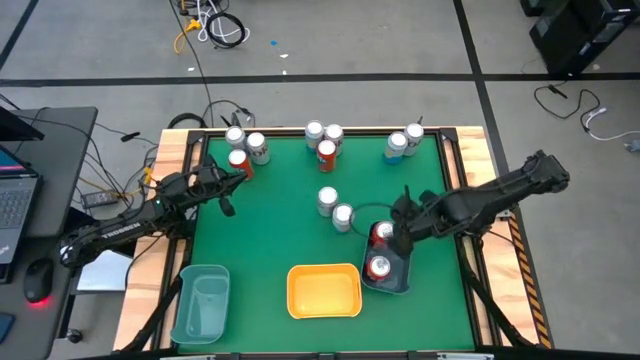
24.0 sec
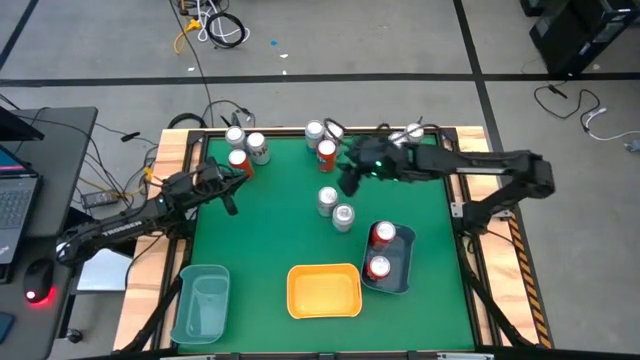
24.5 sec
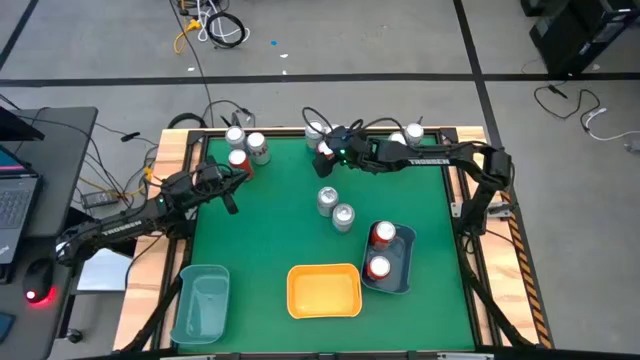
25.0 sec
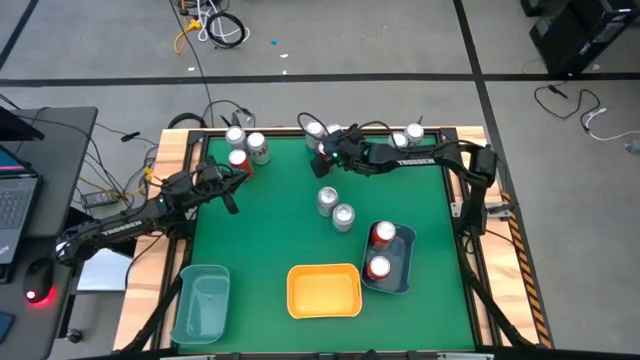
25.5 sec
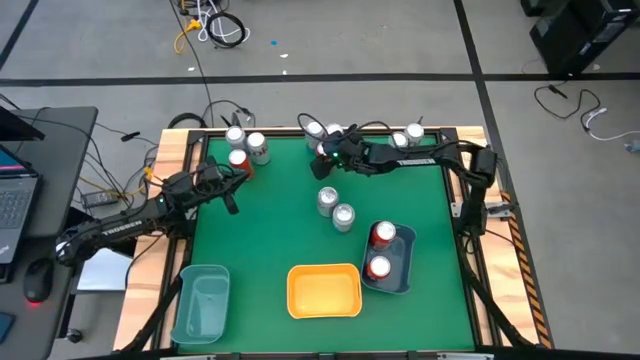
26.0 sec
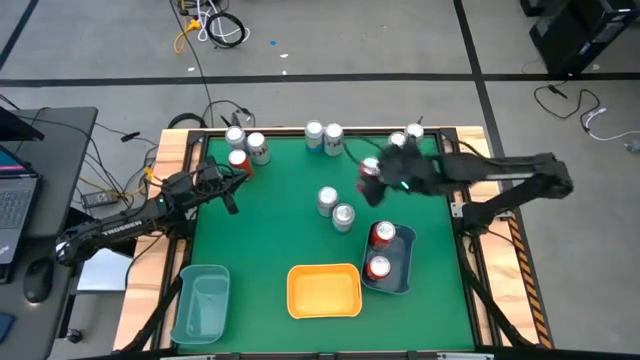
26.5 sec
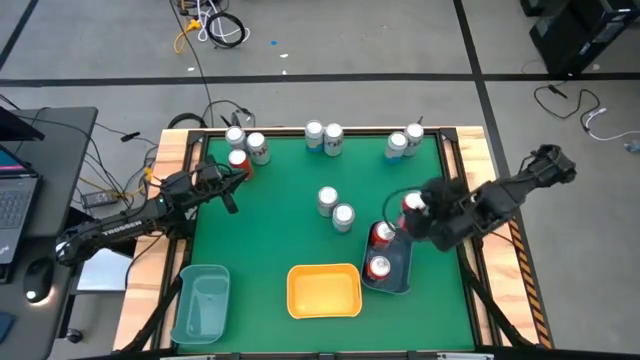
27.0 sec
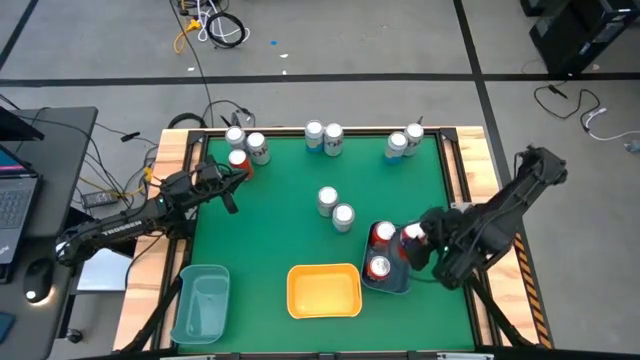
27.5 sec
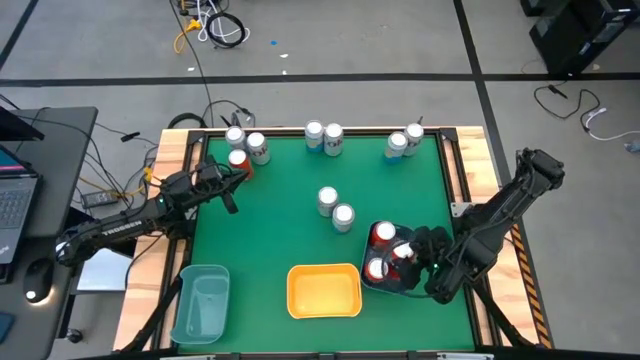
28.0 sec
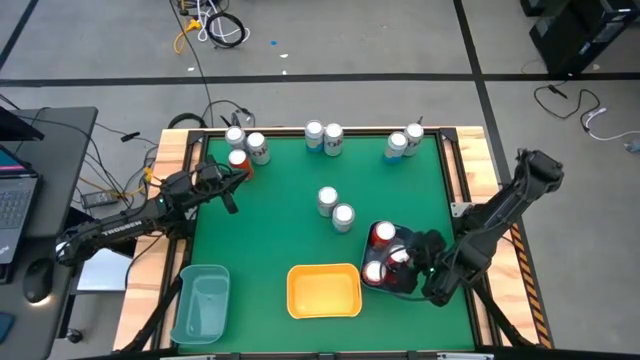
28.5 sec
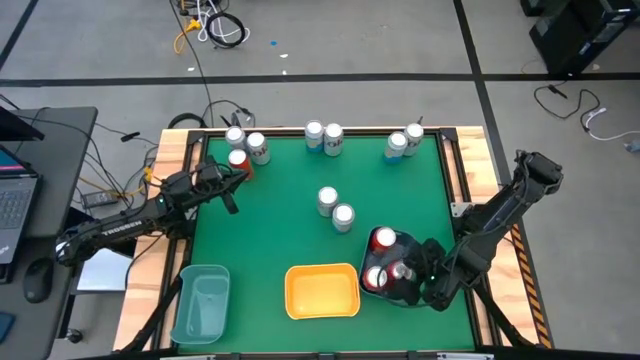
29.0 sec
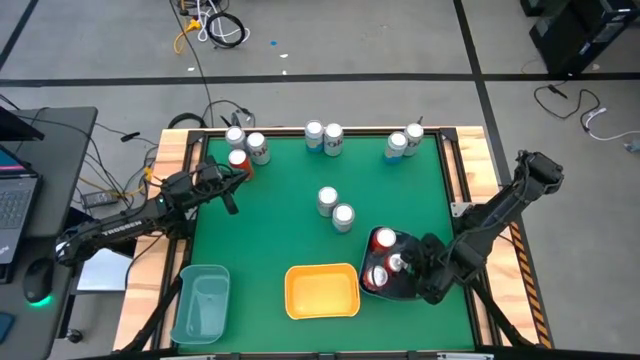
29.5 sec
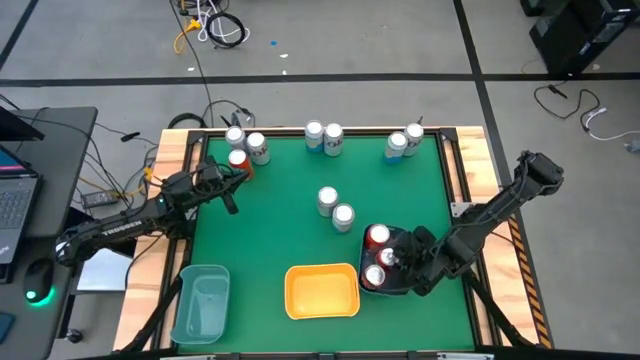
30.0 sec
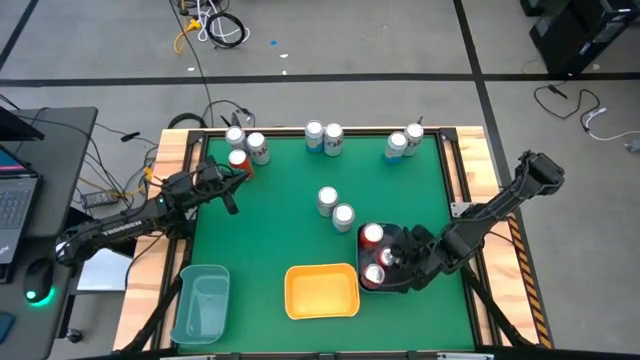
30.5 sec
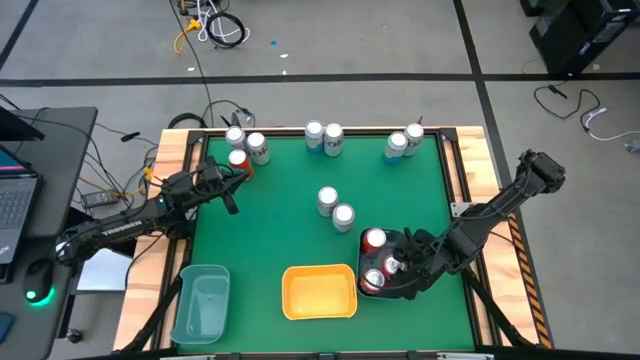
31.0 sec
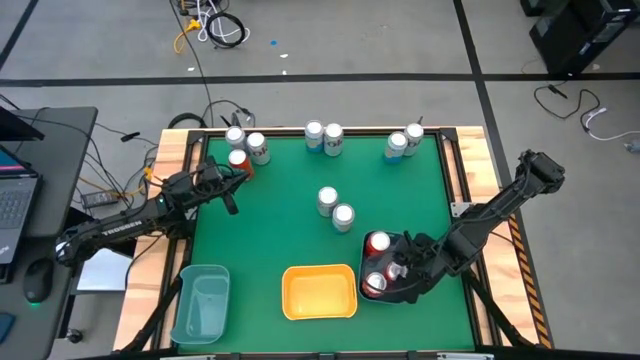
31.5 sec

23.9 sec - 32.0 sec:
Task: Sort soda cans
Put the red soda can into the blue bin

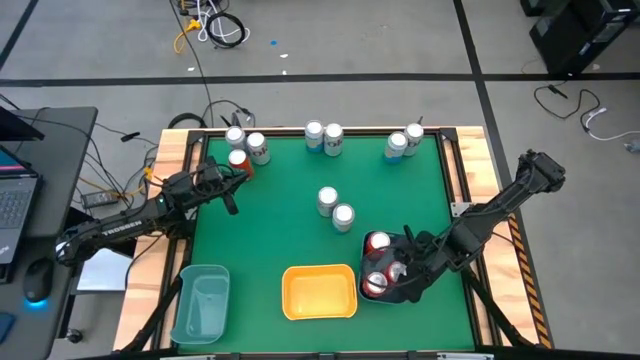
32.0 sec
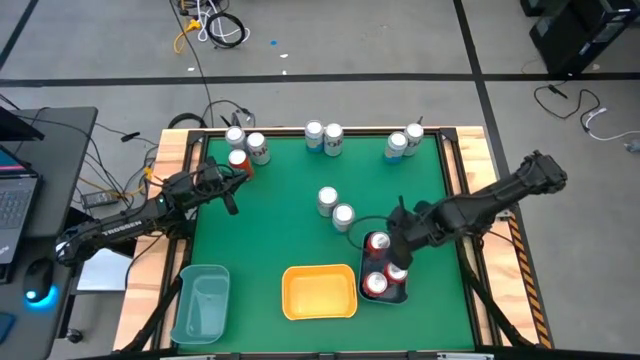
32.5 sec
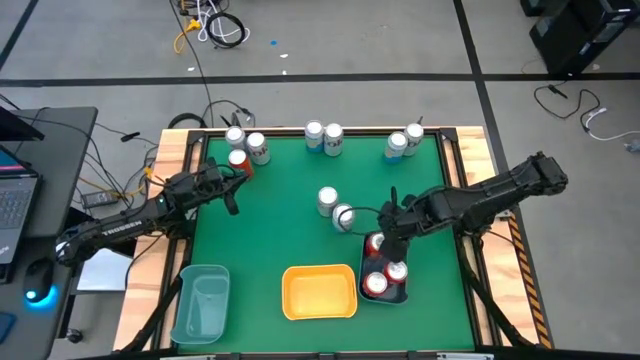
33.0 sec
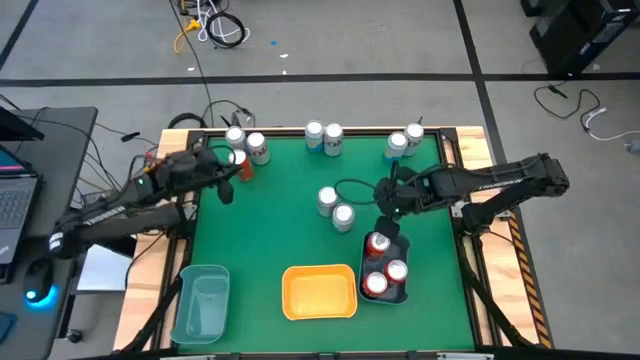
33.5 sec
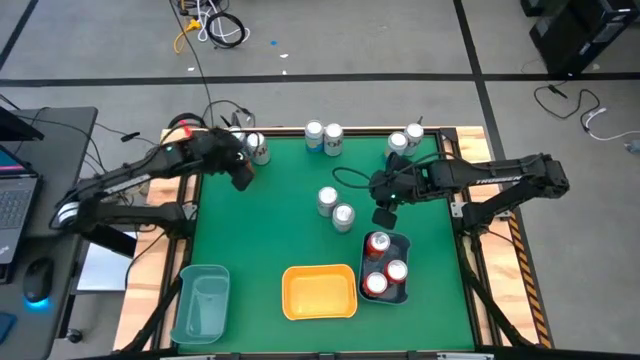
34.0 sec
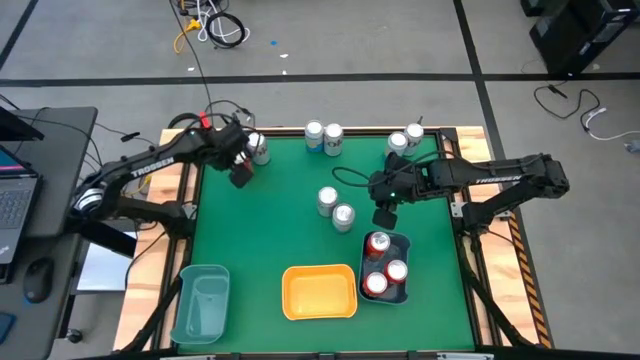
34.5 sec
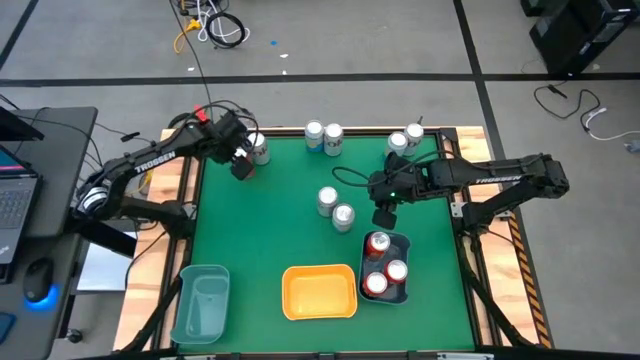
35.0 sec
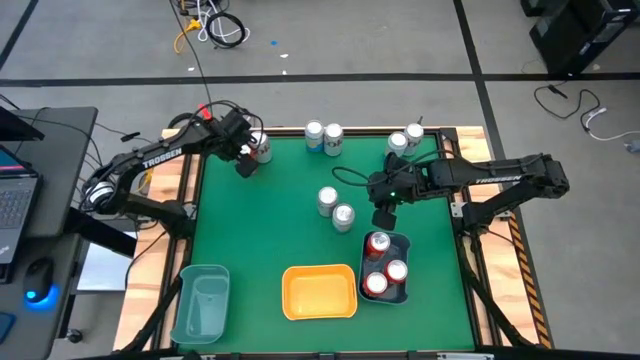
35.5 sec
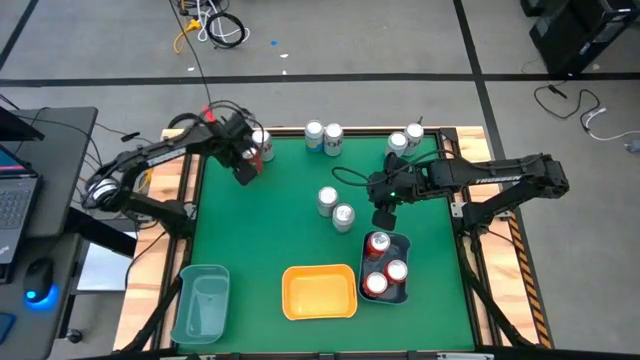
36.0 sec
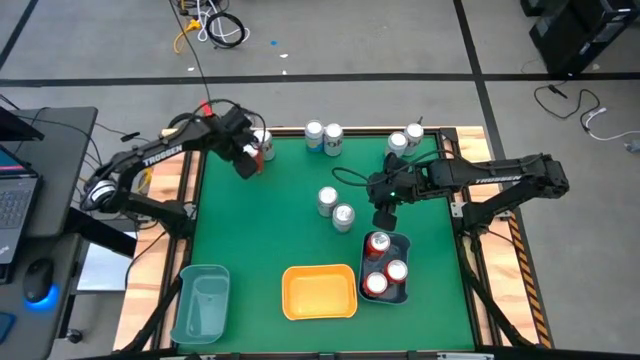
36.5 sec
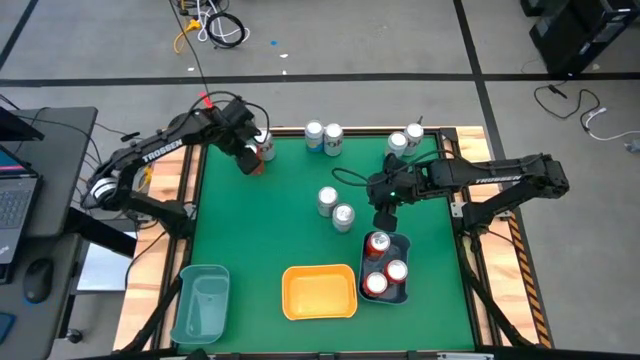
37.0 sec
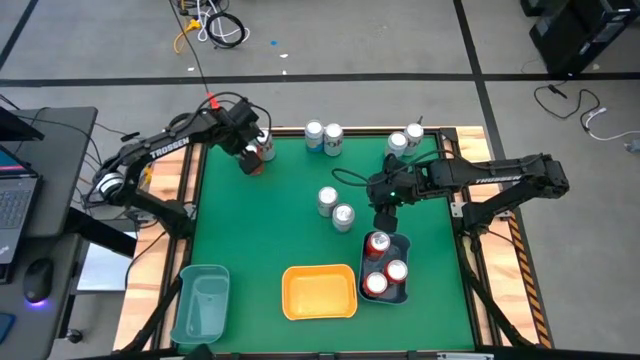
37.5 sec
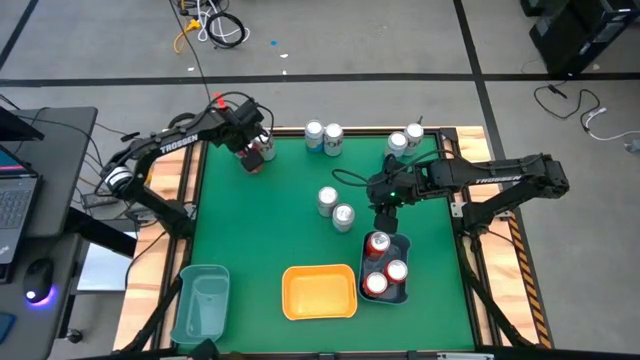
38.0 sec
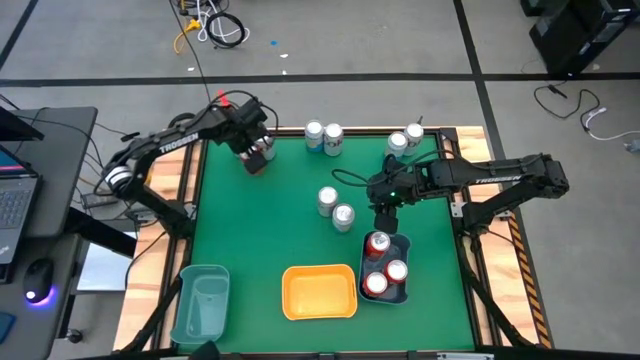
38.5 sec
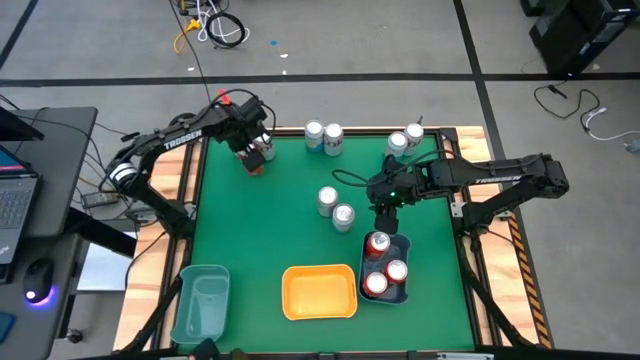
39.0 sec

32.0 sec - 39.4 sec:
Put the red soda can into the blue bin

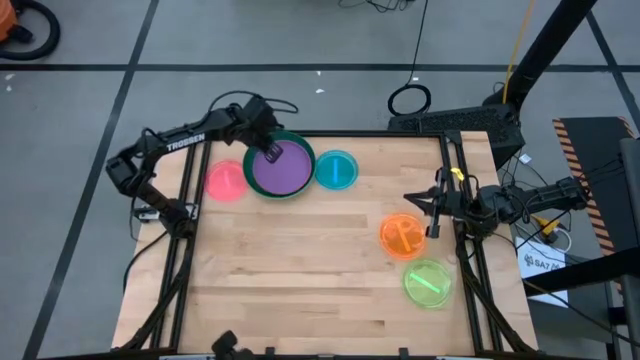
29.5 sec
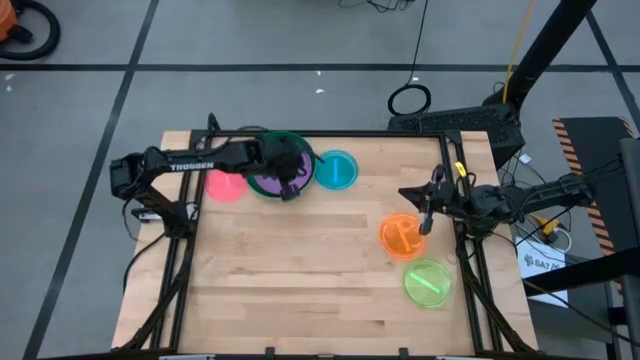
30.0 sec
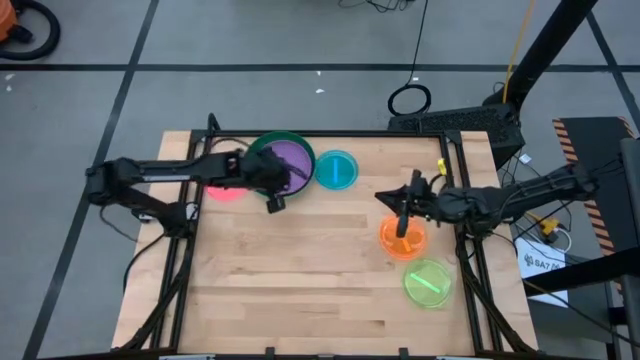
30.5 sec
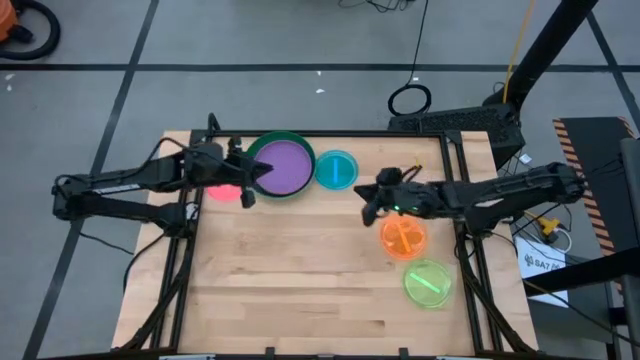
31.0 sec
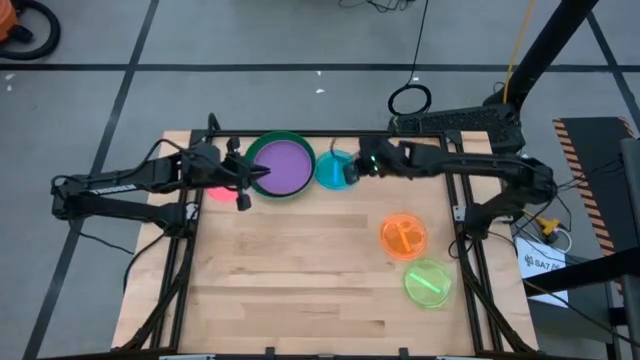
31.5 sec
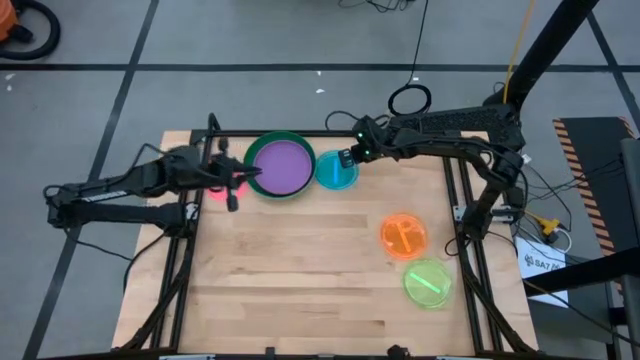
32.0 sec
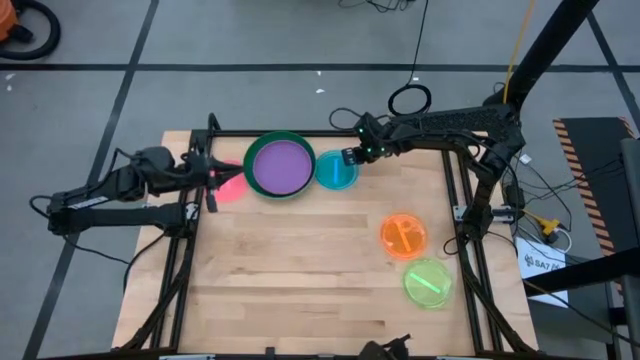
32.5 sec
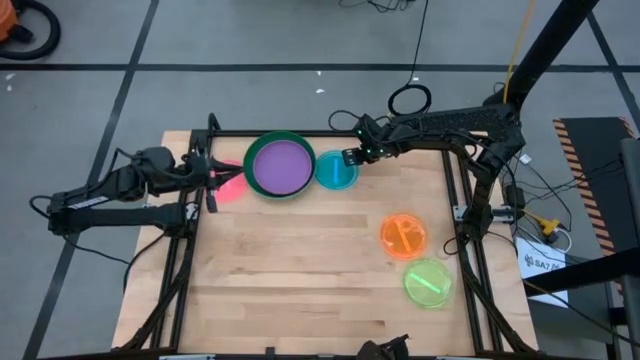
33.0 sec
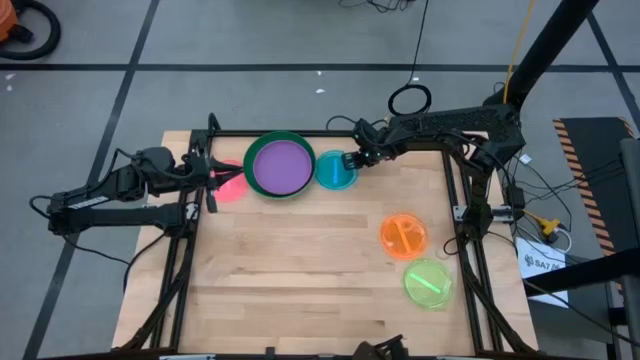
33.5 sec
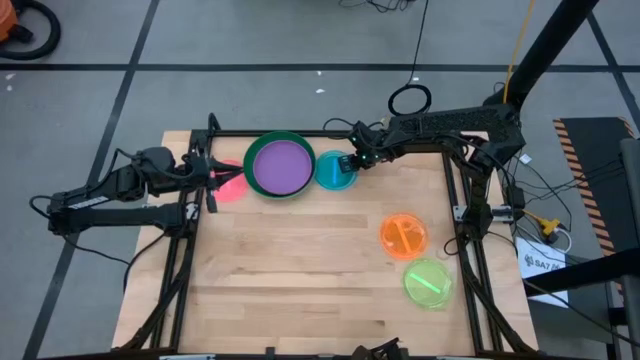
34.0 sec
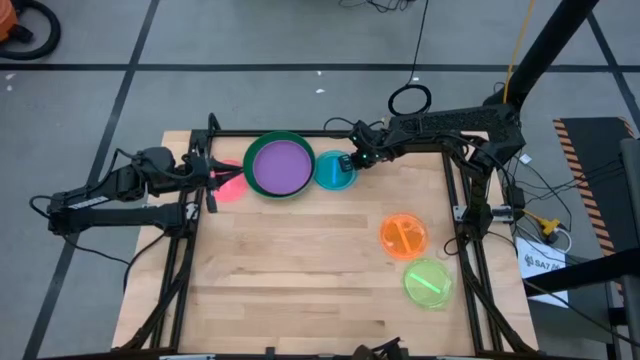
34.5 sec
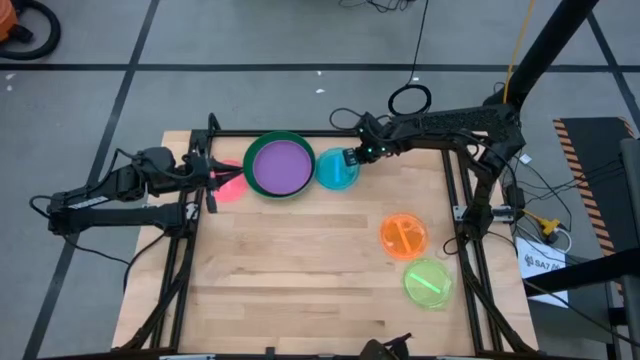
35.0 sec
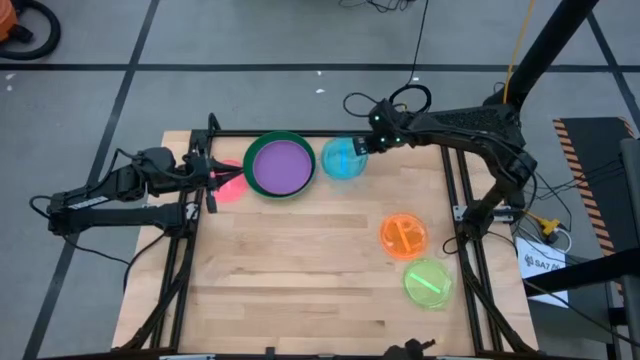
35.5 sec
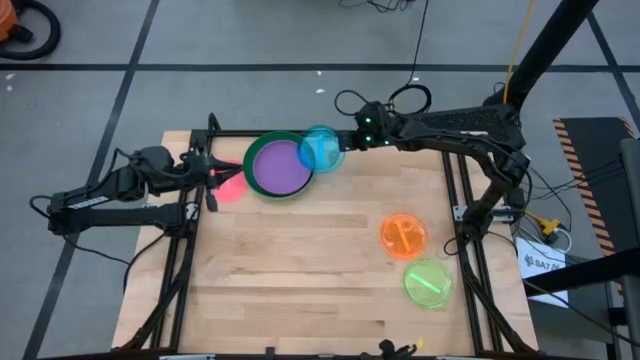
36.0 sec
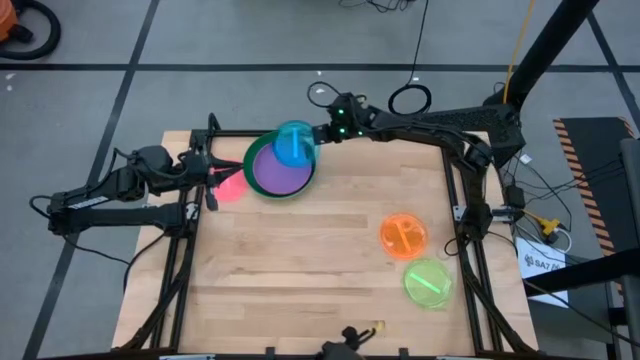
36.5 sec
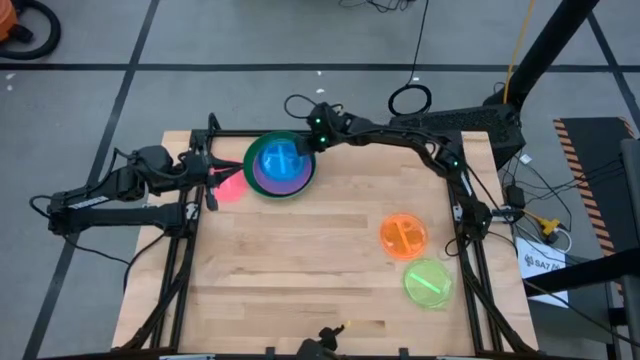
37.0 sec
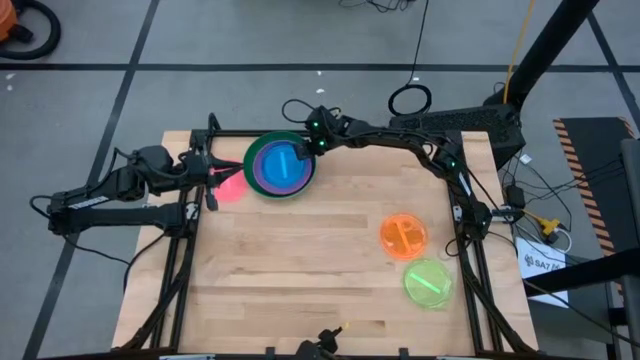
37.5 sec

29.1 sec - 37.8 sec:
Task: Stack plastic plates
Stack the blue plate on top of the purple plate
